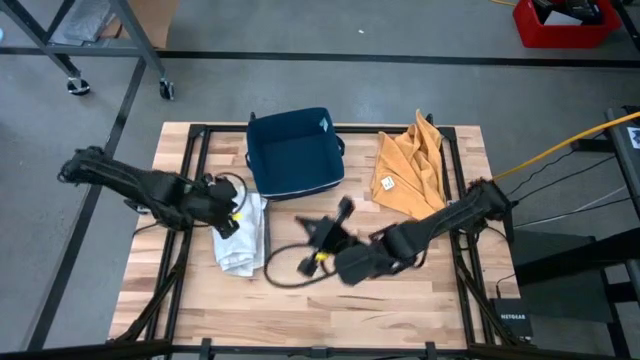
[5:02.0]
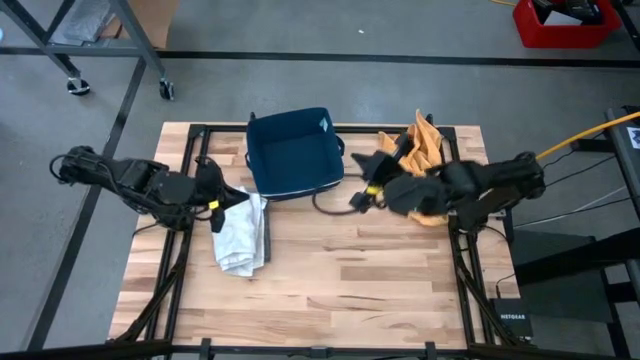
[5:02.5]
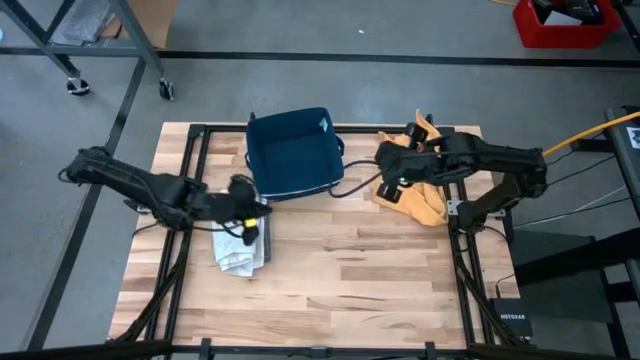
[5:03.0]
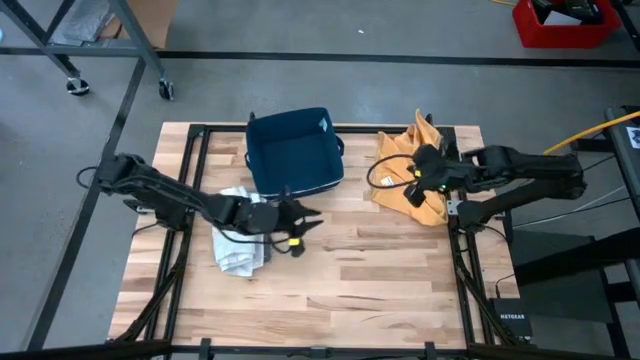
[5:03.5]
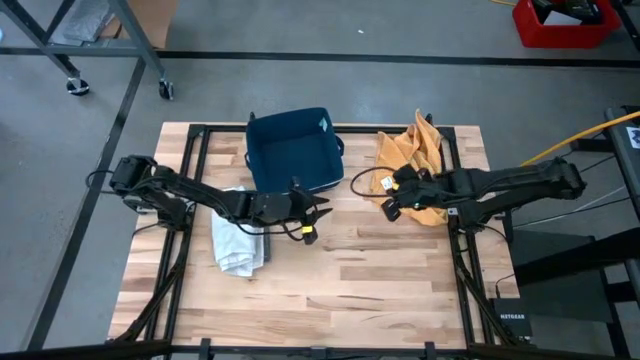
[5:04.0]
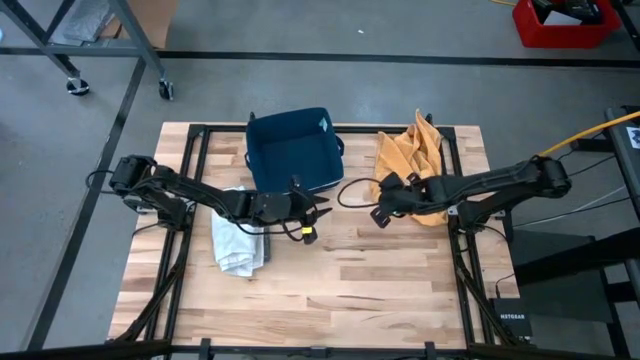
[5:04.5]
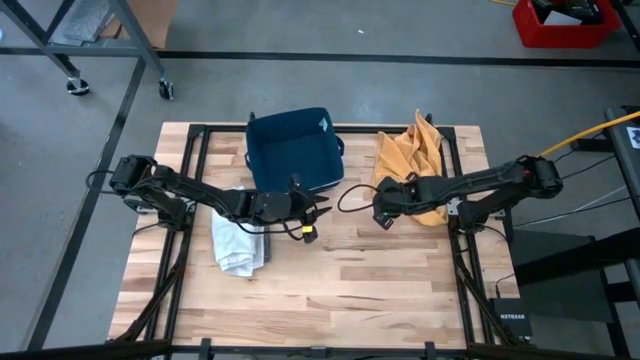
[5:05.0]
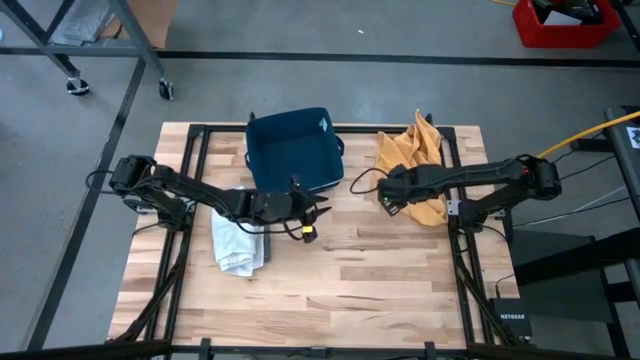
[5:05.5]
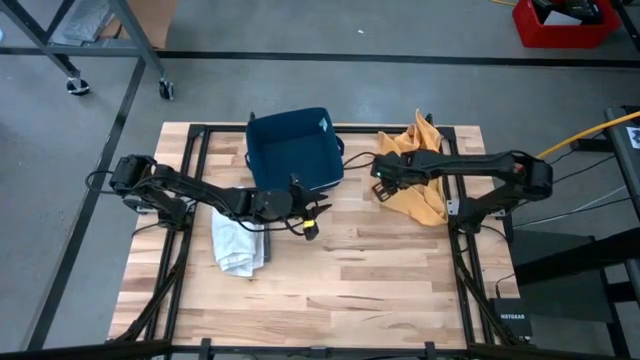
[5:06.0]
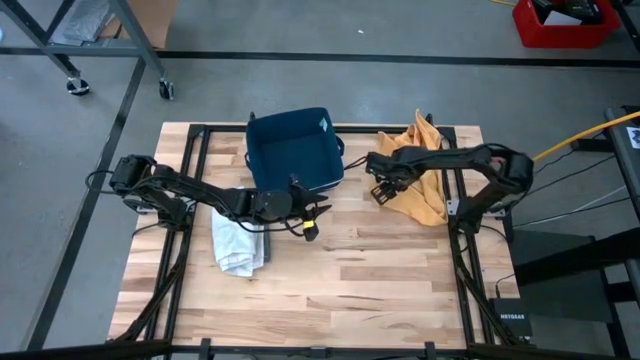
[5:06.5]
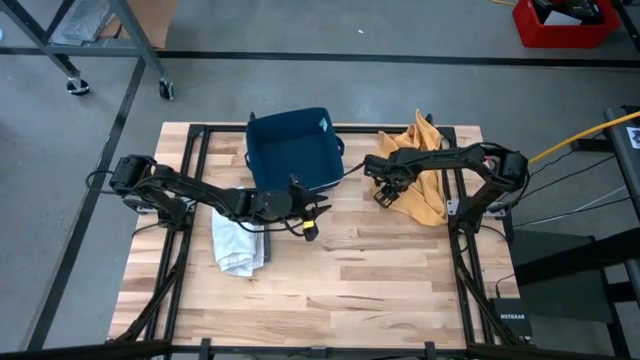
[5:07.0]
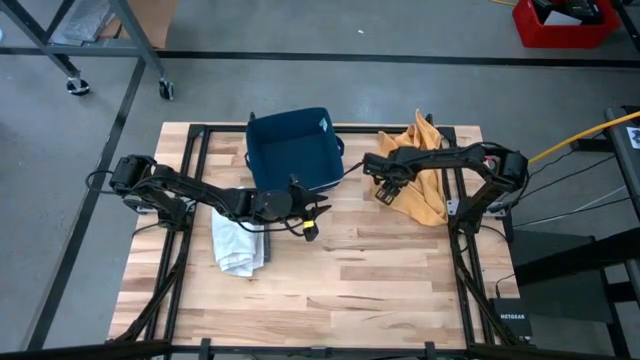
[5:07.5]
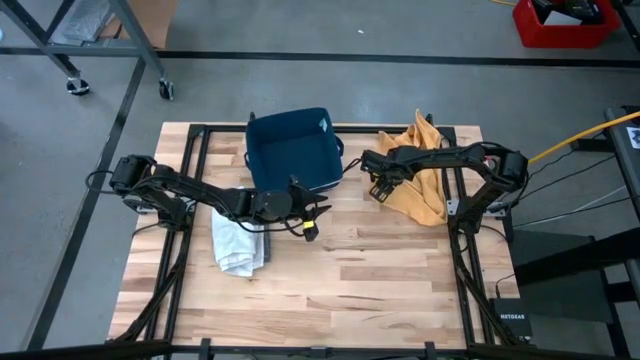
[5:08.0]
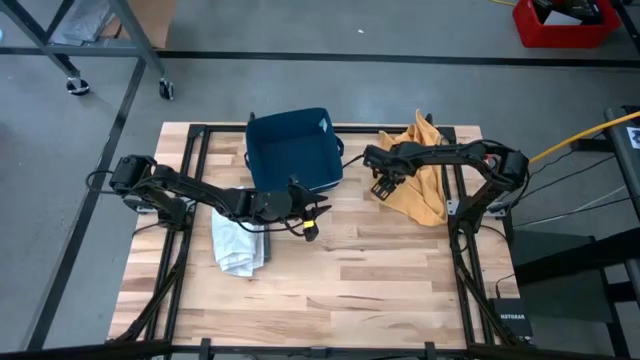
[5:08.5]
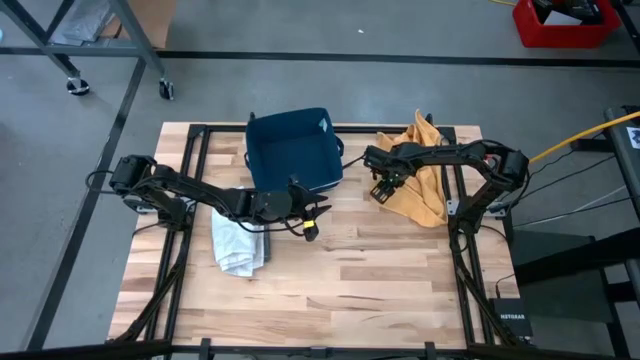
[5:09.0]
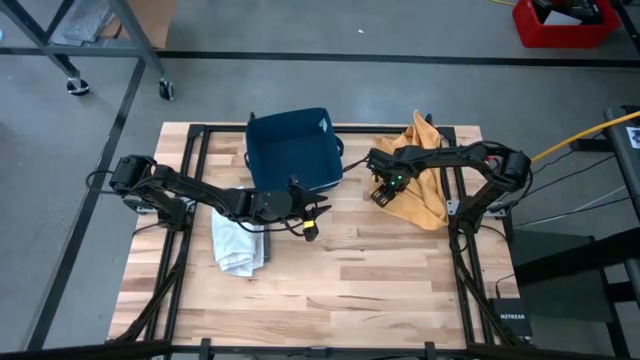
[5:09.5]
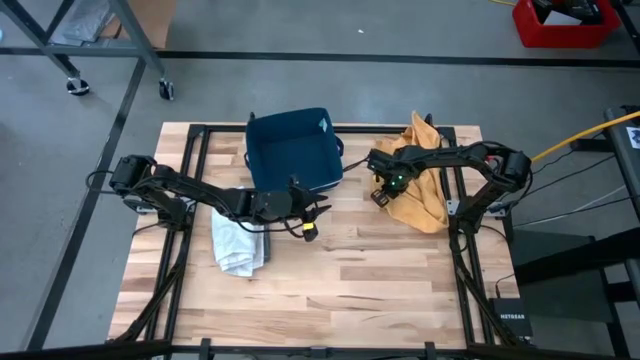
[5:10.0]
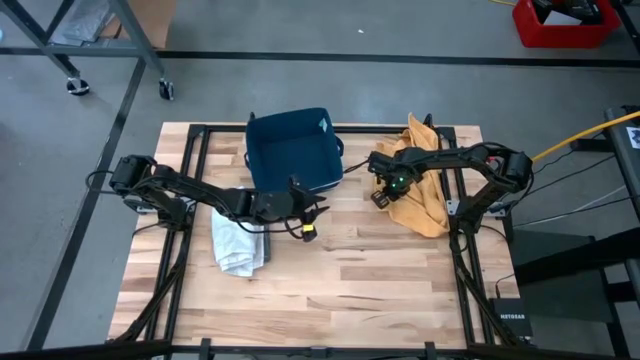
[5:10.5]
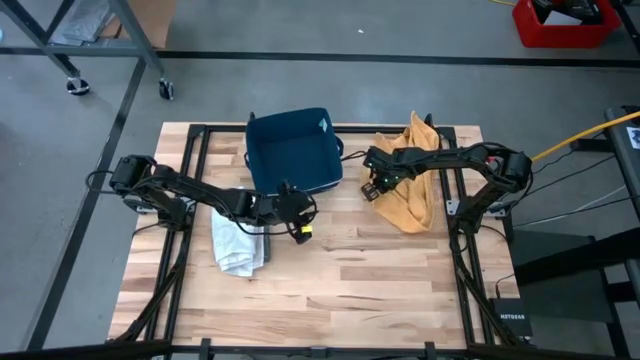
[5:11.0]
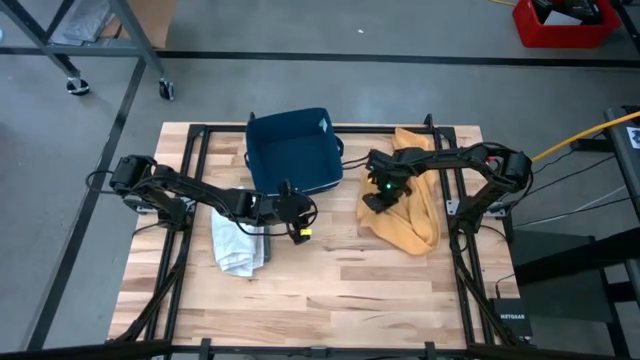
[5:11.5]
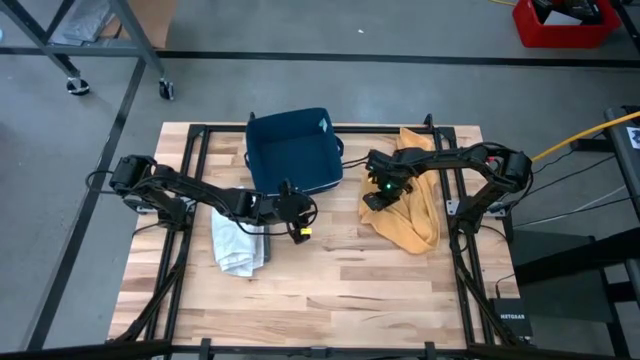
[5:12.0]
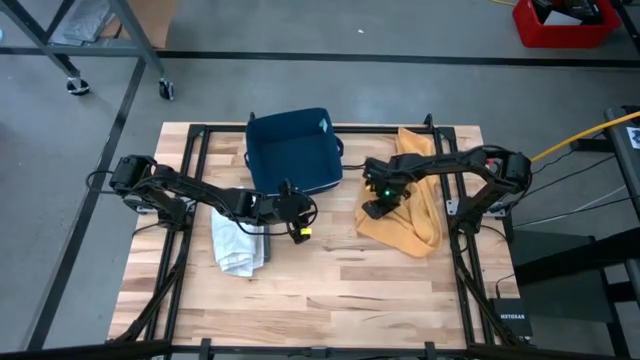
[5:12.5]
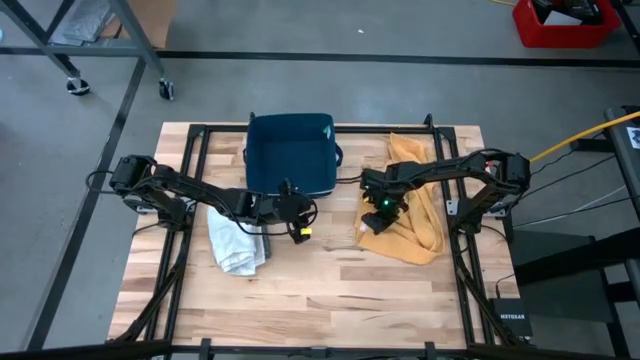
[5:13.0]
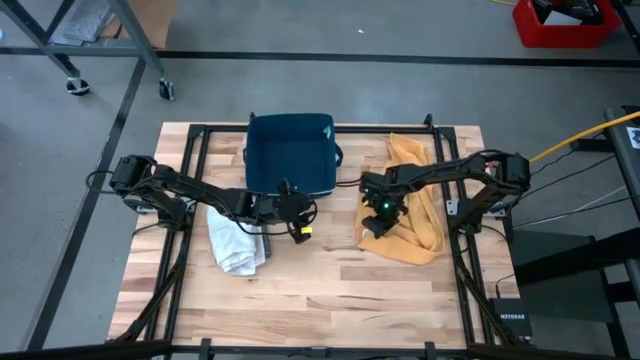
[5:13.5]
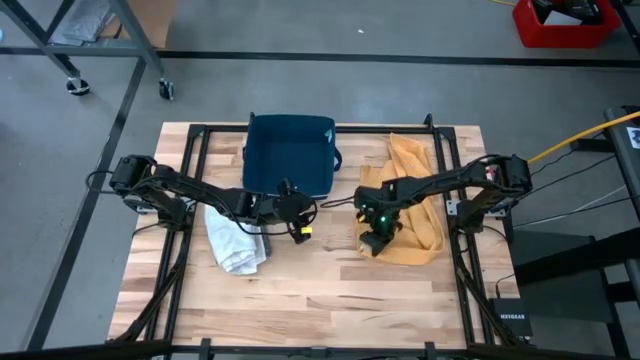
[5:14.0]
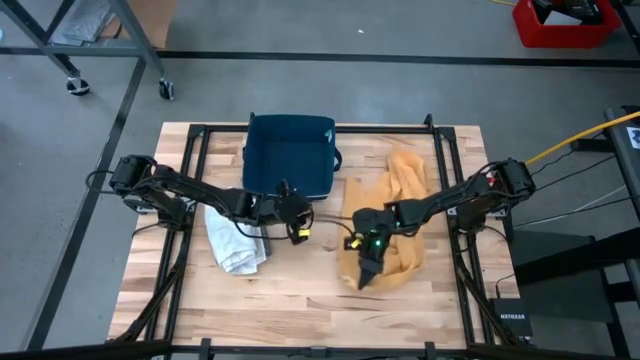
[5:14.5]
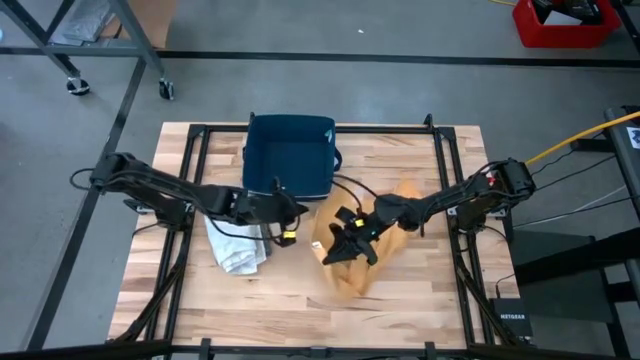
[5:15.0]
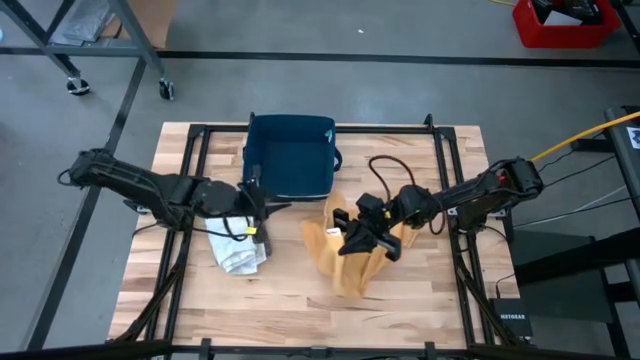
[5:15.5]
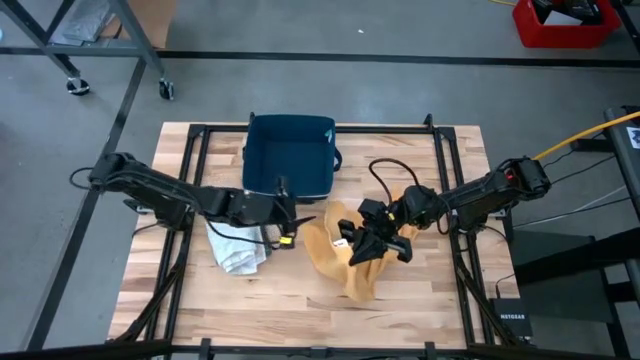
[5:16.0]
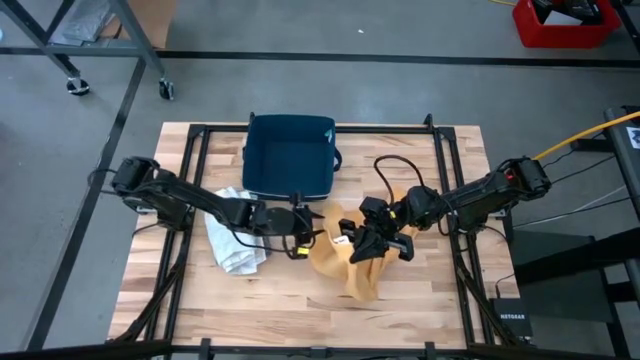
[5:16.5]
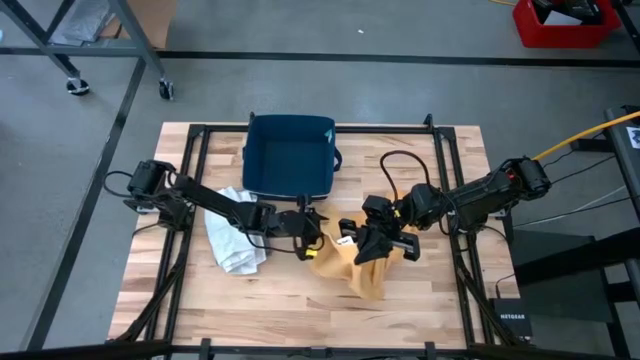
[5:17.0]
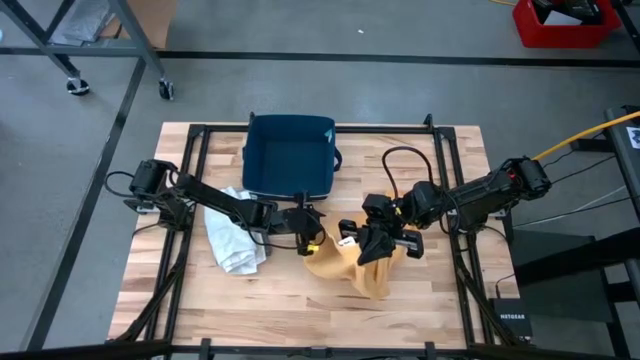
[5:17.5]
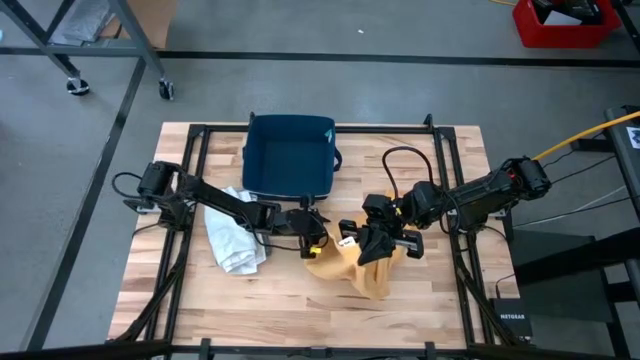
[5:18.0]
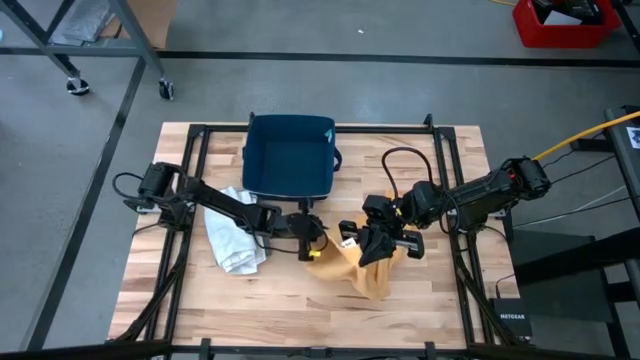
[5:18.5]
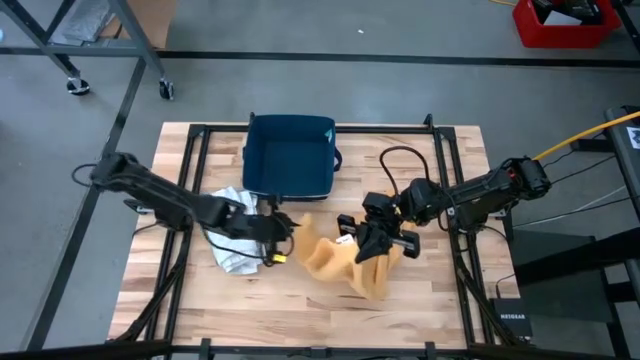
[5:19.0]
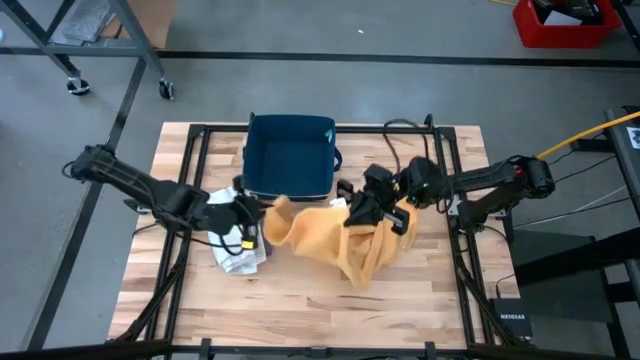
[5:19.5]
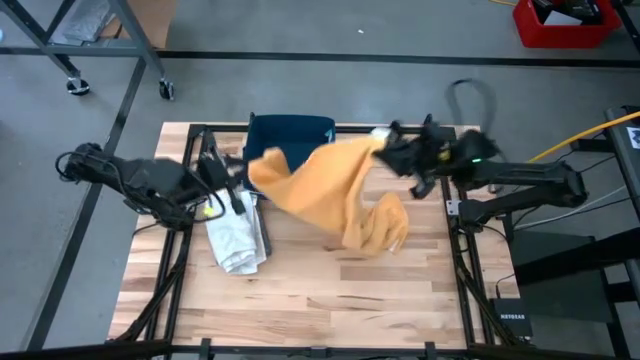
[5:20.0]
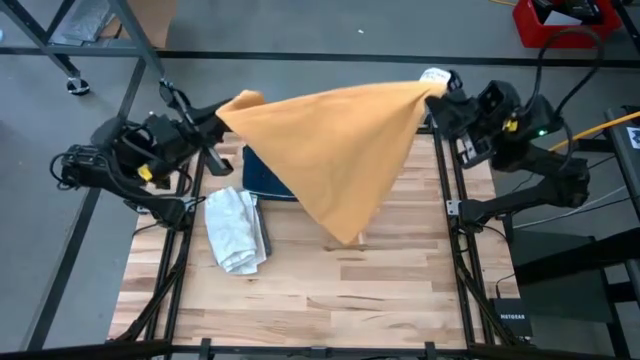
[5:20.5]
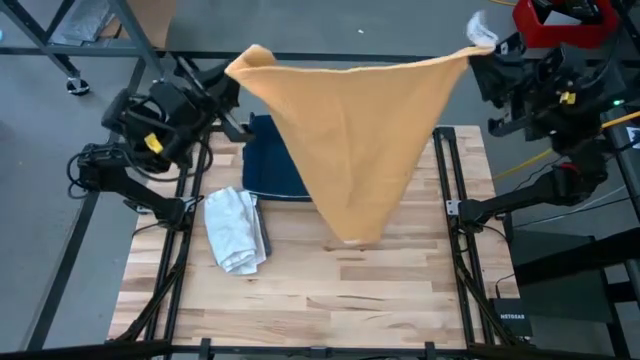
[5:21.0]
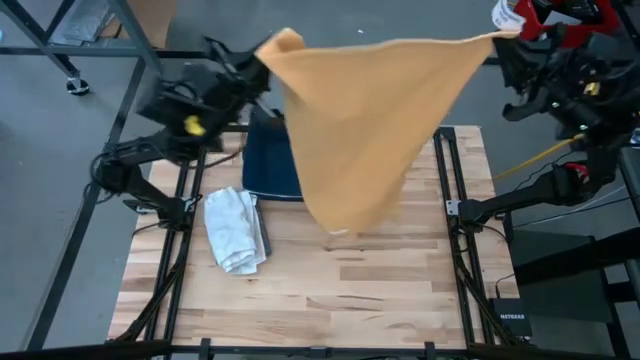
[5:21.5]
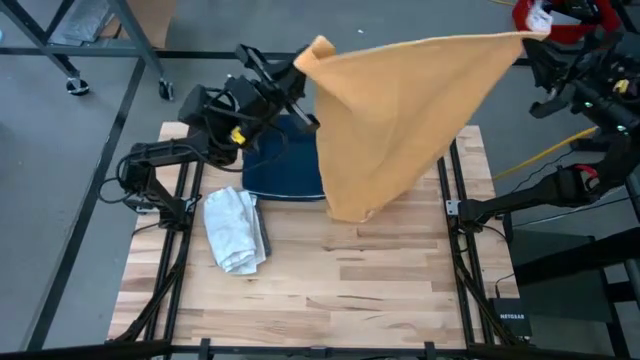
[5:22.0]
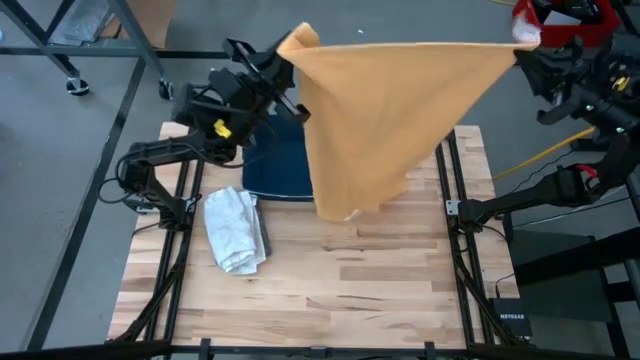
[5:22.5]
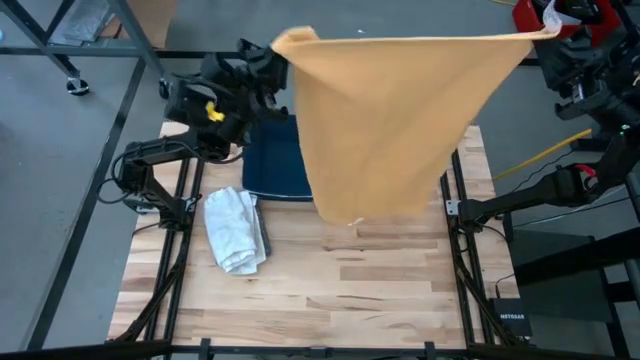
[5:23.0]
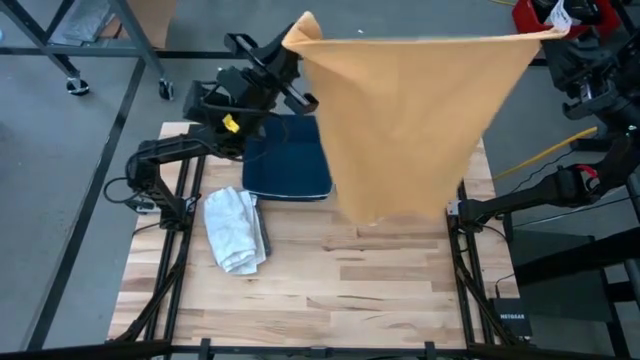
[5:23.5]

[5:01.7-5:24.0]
Task: Fold towel
Fold the yellow towel
